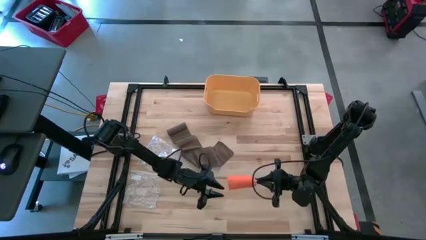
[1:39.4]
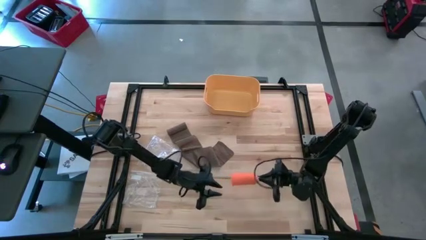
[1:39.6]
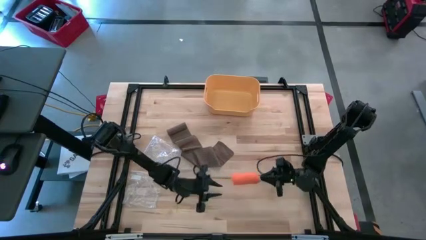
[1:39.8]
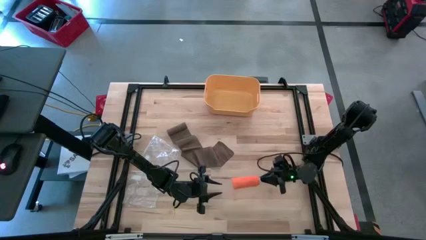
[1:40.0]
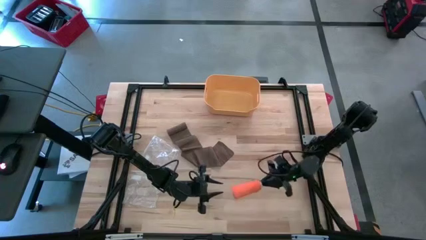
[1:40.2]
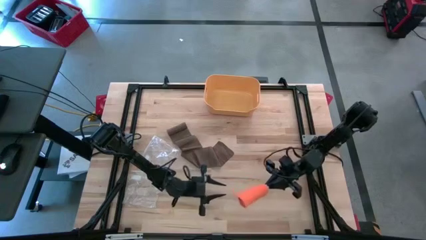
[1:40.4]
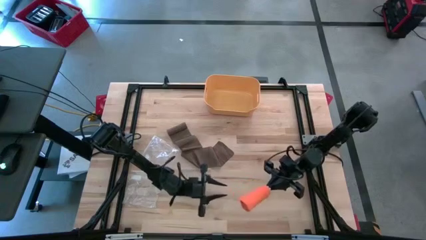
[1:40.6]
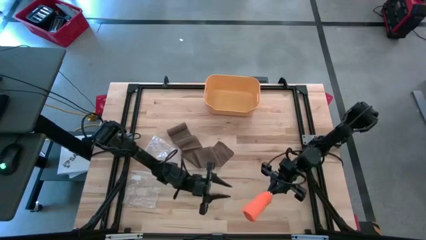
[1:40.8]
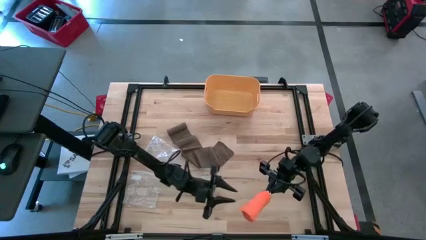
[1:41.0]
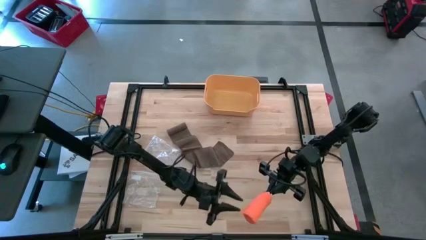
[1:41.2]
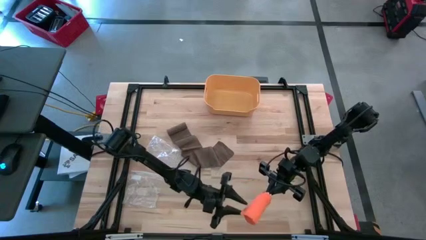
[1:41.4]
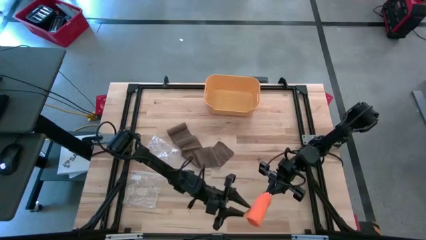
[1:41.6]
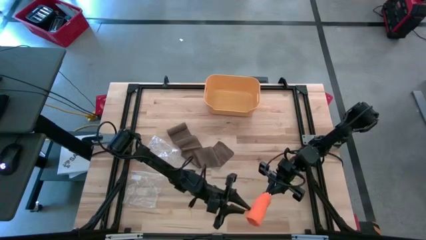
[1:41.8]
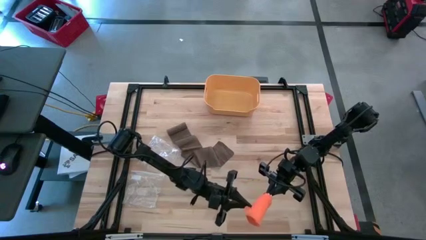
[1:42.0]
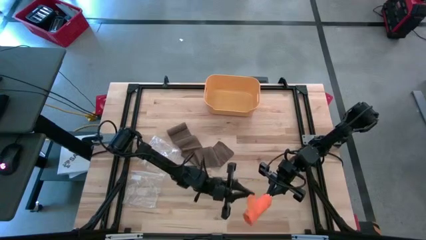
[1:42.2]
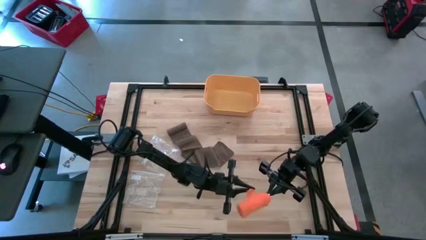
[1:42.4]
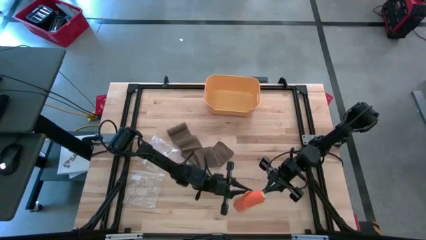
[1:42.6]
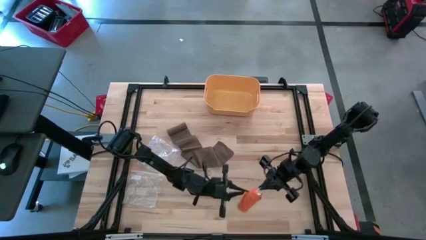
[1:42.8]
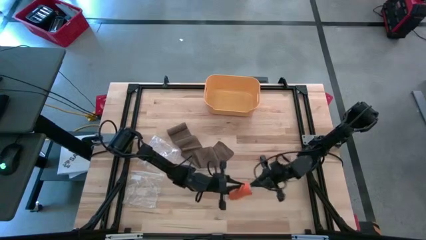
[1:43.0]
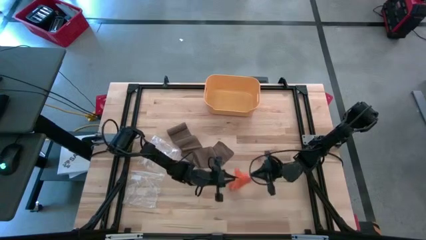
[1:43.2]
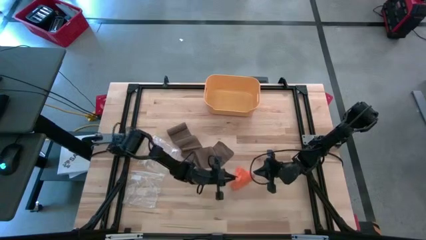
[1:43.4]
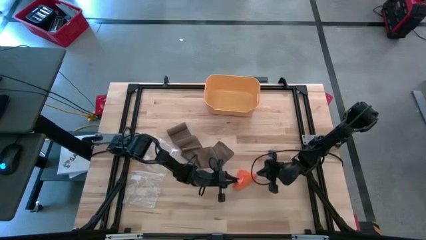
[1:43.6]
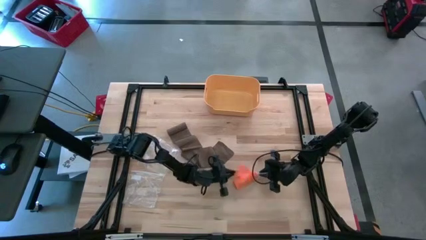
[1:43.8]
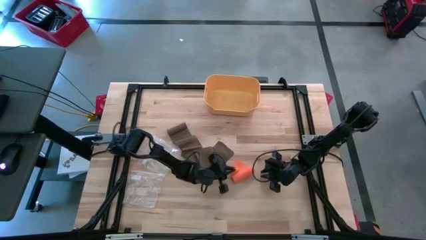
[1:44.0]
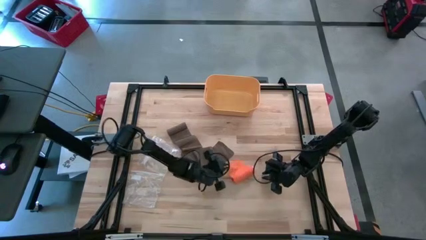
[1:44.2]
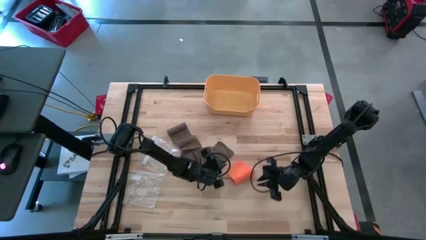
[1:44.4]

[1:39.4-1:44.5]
Task: Roll bandage
Roll the orange bandage

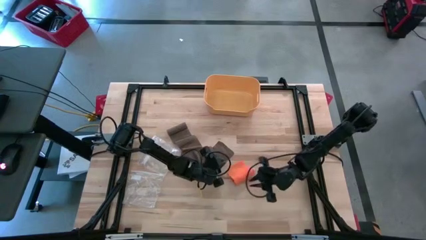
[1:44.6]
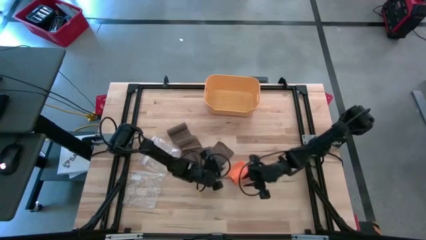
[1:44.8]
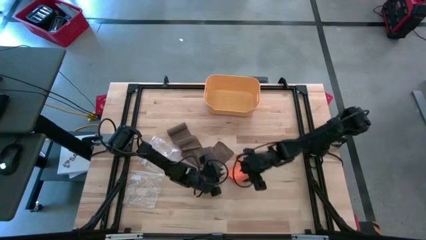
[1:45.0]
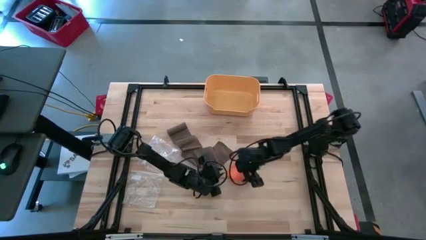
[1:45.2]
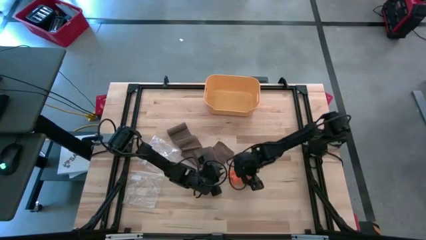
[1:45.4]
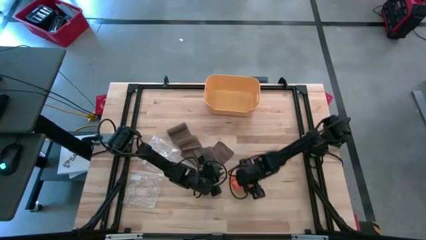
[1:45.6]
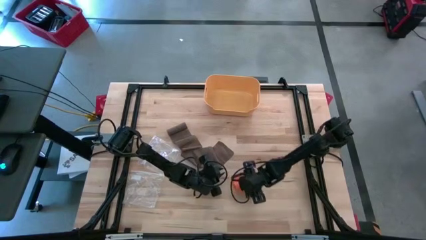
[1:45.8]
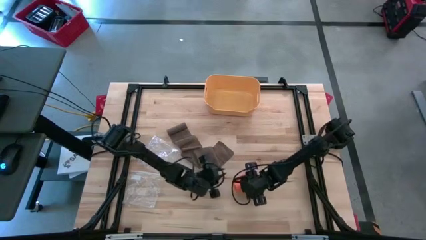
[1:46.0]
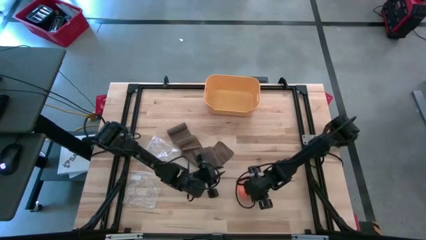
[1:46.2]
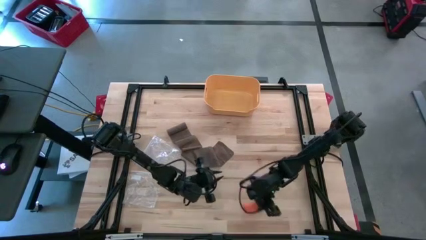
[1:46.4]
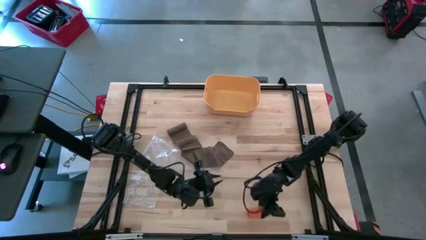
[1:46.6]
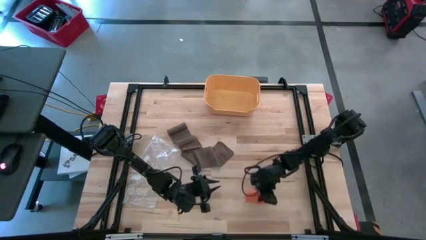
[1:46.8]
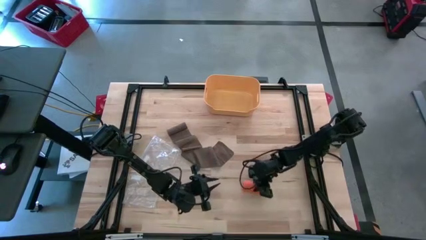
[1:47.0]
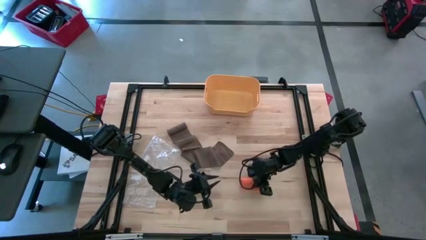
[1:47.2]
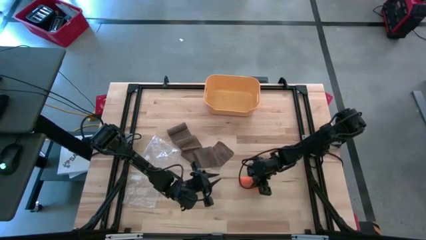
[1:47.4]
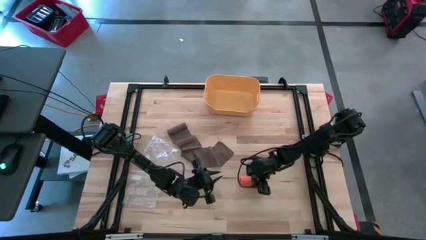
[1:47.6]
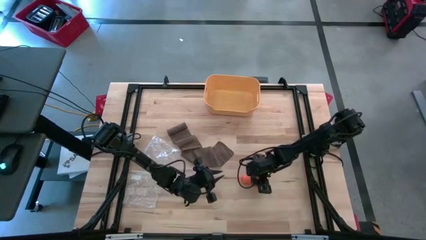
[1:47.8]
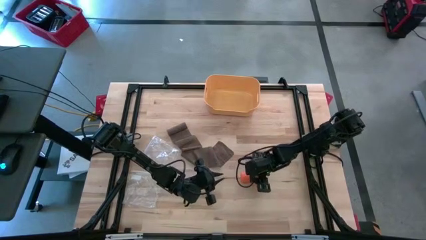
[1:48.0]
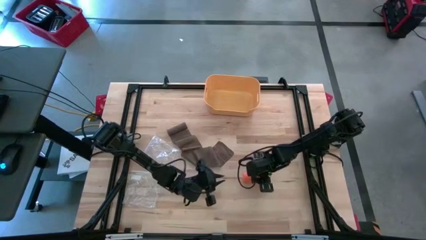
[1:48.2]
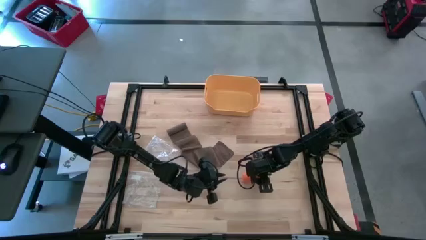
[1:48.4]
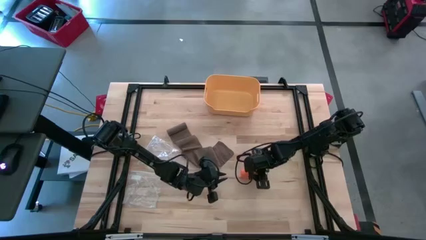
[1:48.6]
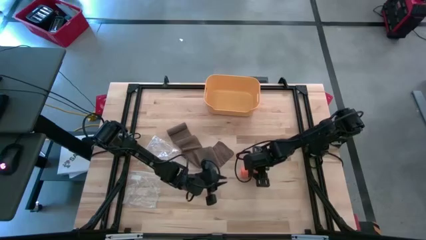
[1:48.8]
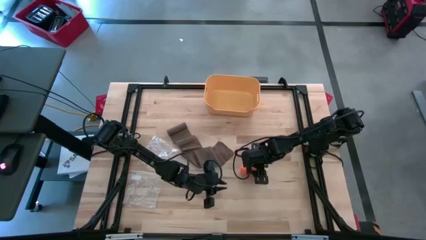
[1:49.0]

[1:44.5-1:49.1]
Roll the orange bandage

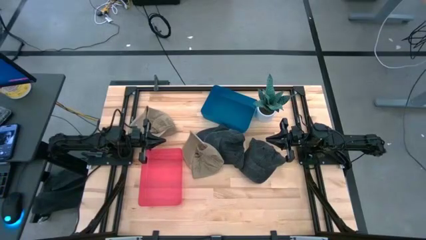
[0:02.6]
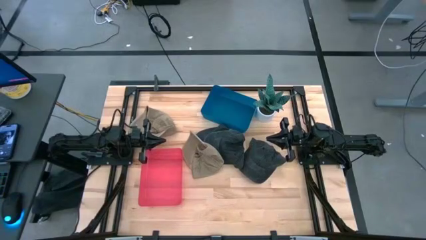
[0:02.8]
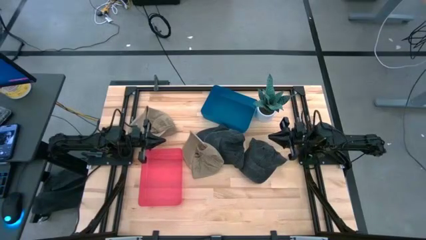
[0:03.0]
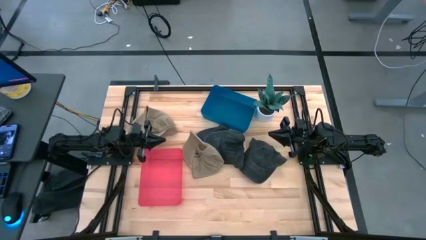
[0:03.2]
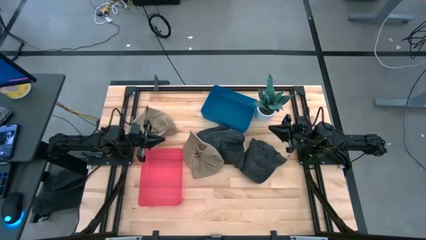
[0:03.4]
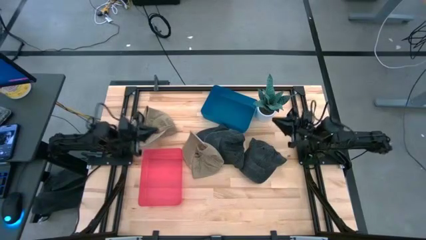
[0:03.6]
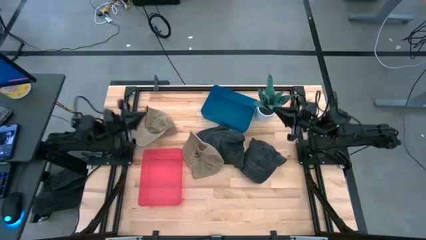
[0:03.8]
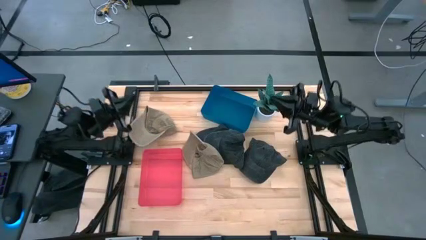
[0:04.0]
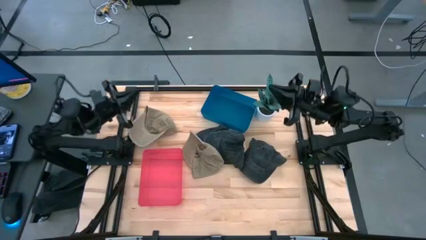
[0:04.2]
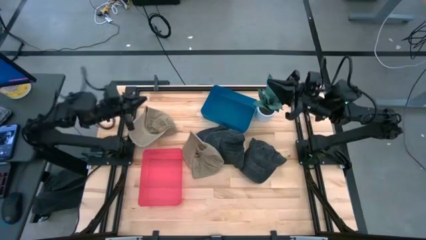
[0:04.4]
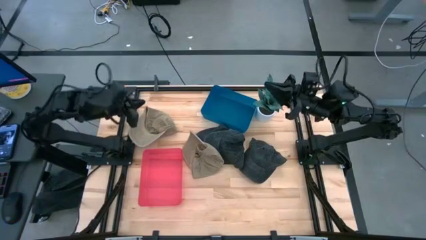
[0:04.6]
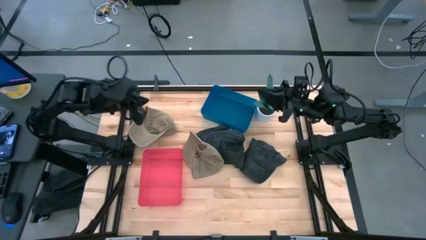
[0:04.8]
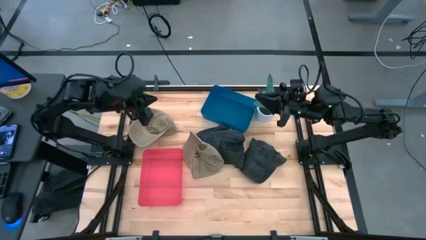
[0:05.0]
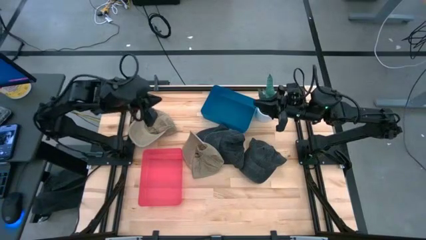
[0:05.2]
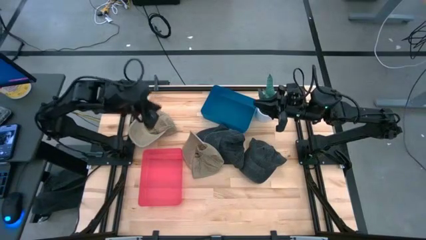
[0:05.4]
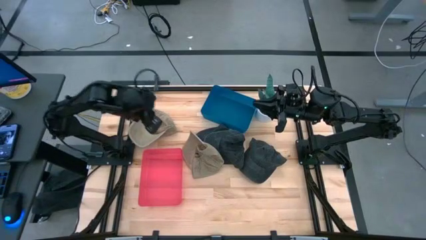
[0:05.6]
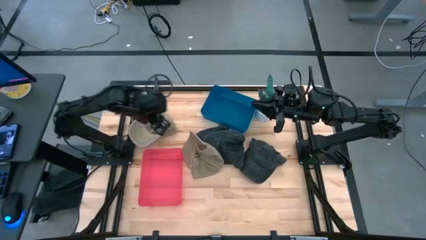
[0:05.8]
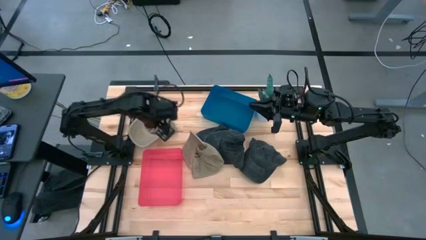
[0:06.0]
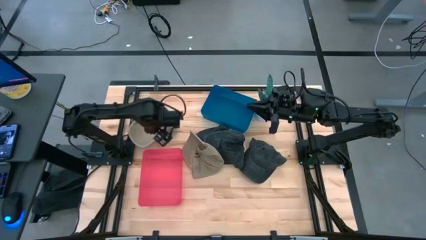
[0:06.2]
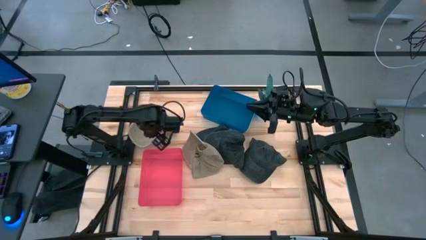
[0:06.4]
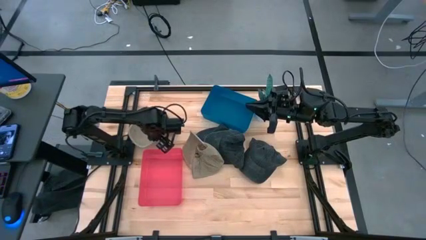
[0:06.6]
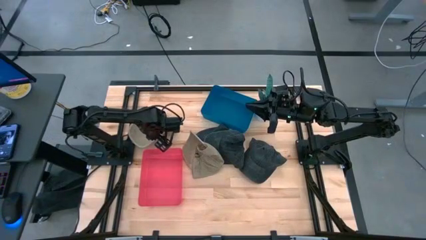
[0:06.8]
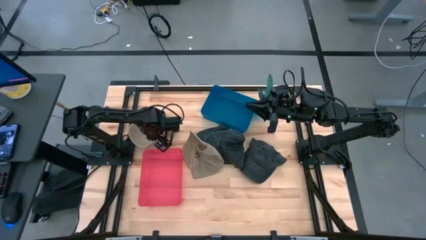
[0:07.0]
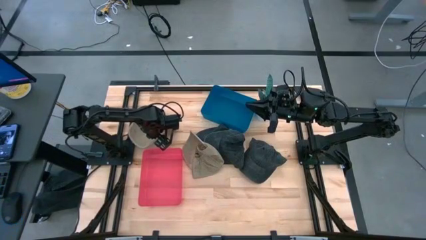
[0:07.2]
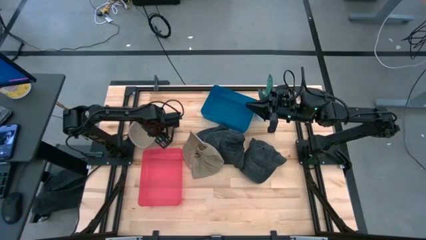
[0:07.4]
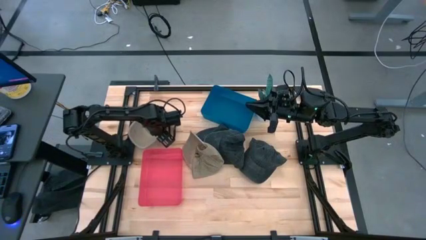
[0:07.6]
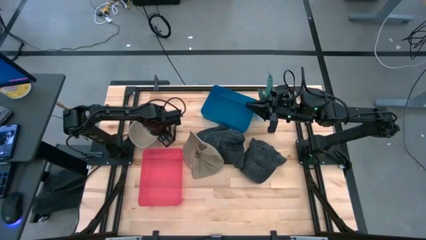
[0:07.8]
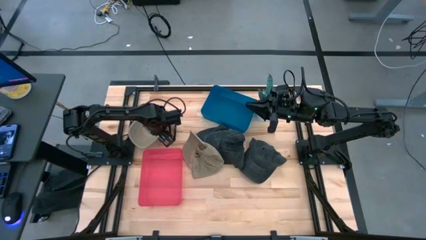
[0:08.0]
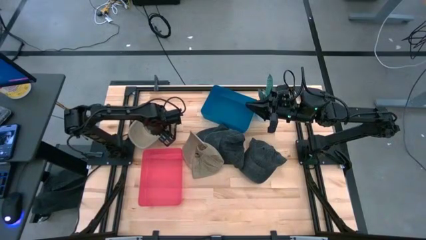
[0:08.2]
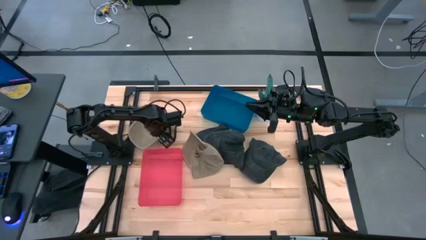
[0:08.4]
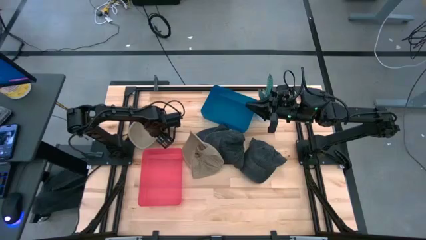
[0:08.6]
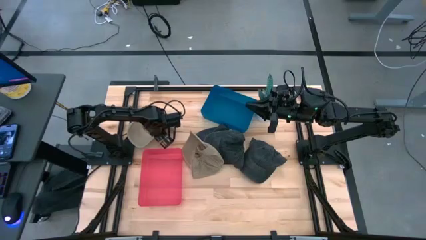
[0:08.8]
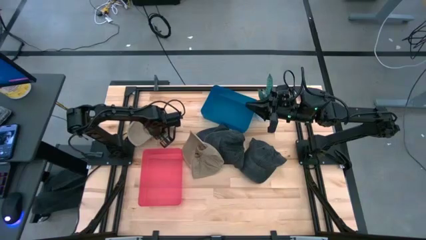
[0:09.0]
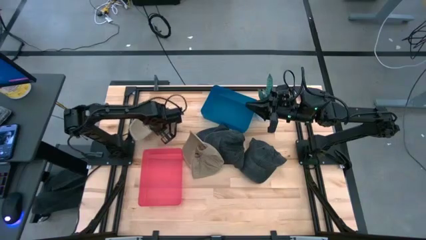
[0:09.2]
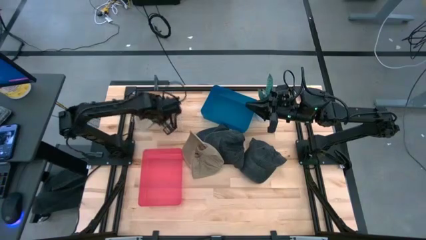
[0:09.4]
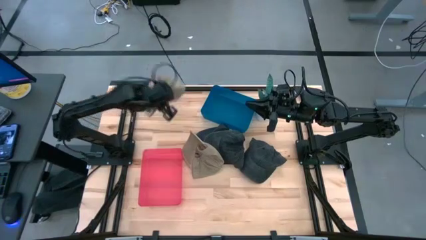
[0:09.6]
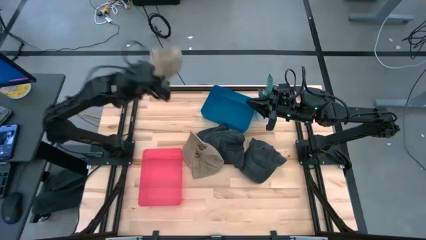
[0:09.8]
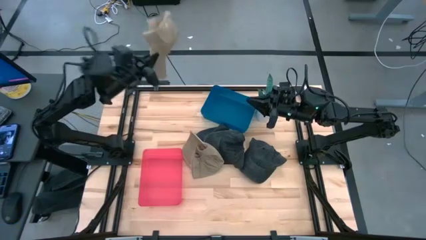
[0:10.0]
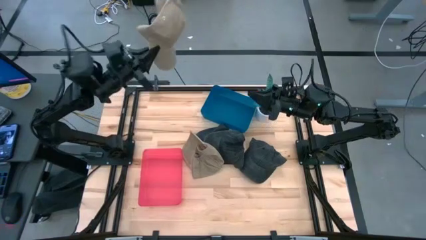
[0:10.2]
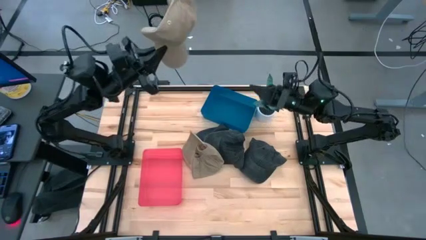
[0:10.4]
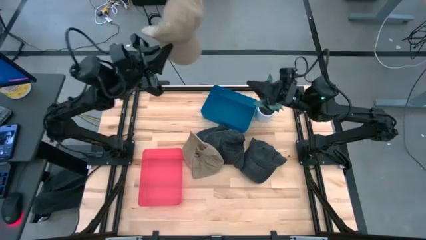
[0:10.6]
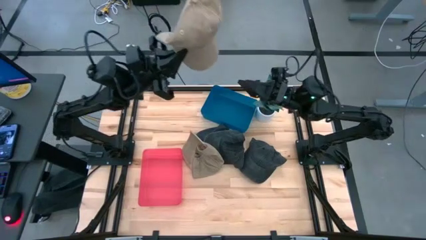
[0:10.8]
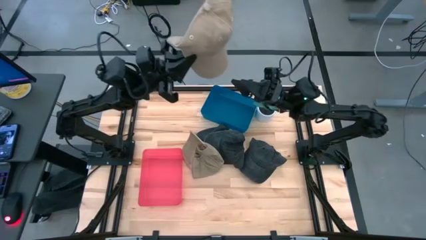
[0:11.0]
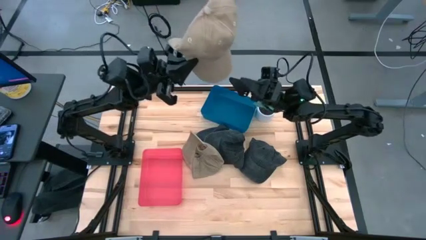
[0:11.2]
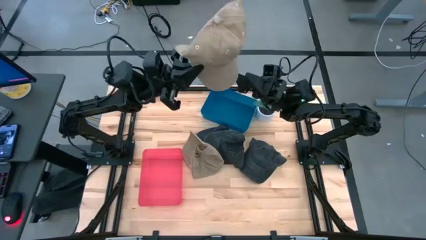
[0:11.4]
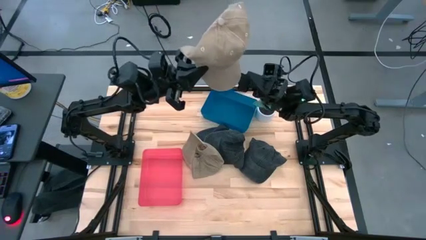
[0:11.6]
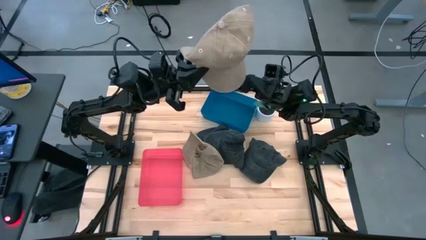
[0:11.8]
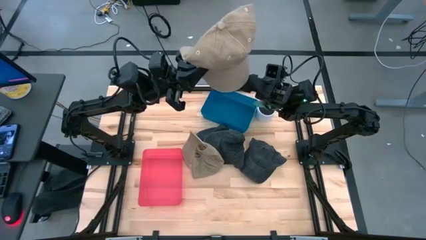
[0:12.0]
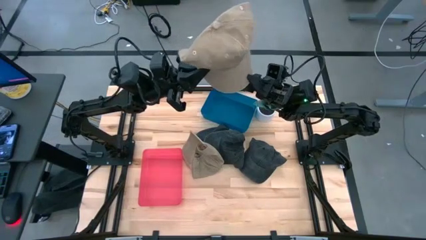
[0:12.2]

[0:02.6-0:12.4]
Task: Pick & Place hat
Put the left brown cap into the red bin
